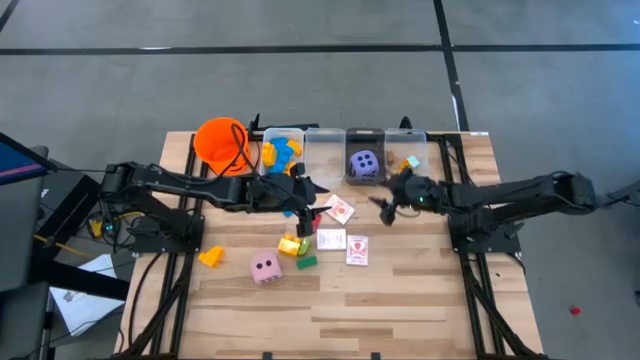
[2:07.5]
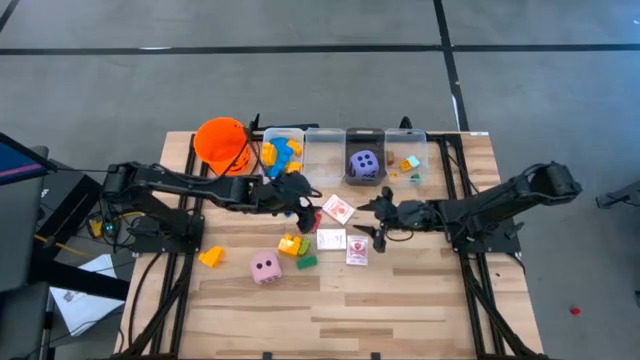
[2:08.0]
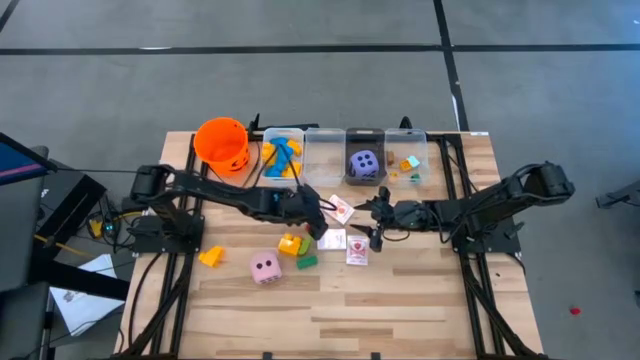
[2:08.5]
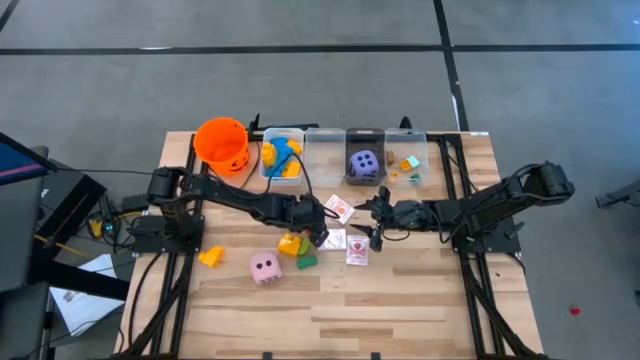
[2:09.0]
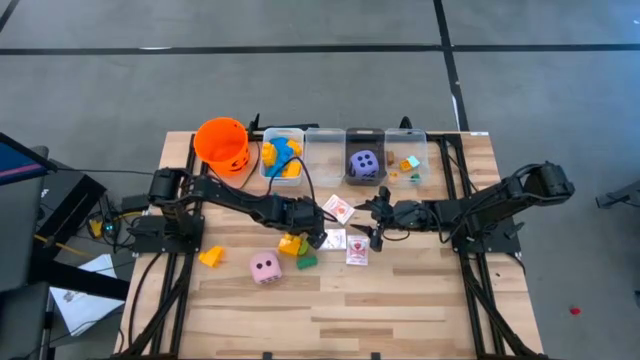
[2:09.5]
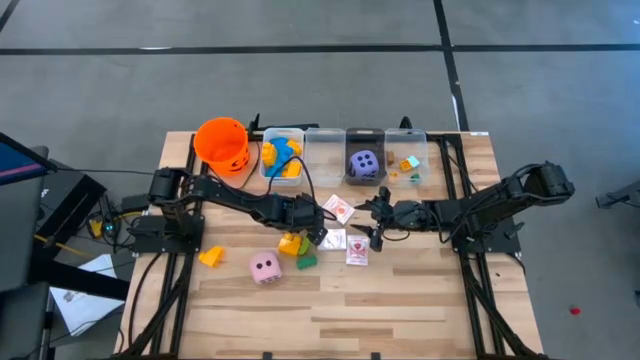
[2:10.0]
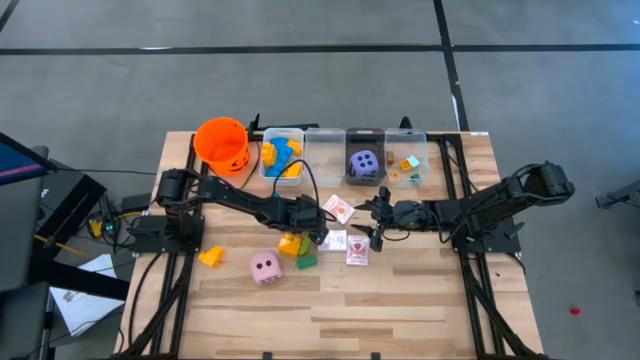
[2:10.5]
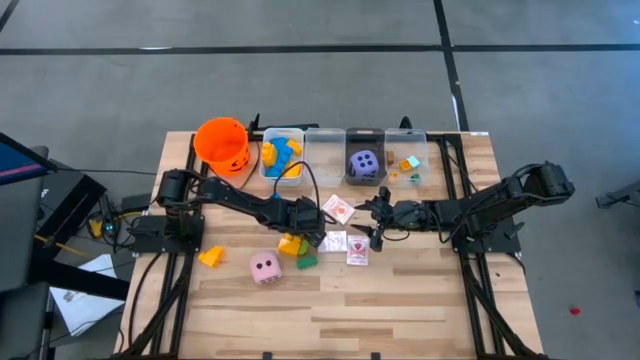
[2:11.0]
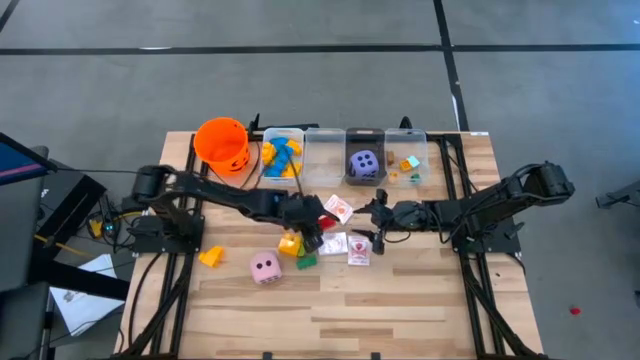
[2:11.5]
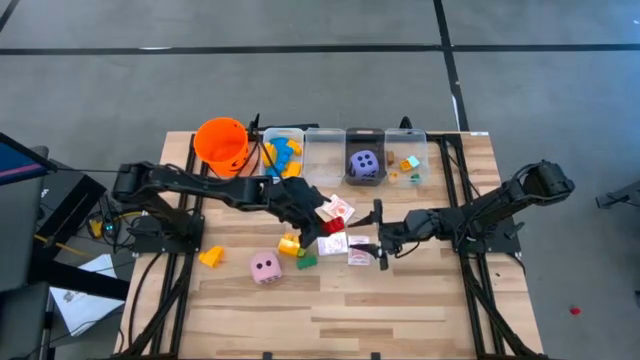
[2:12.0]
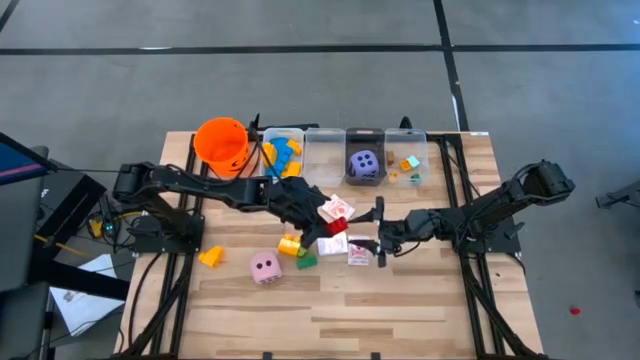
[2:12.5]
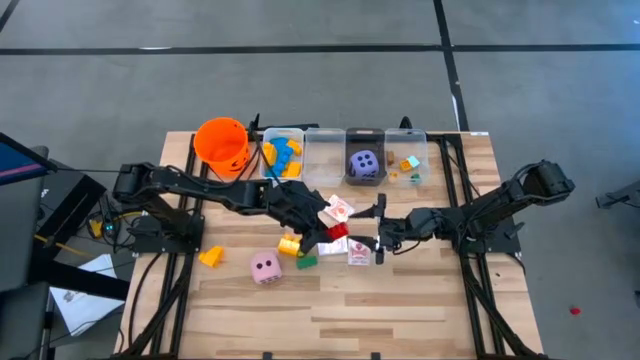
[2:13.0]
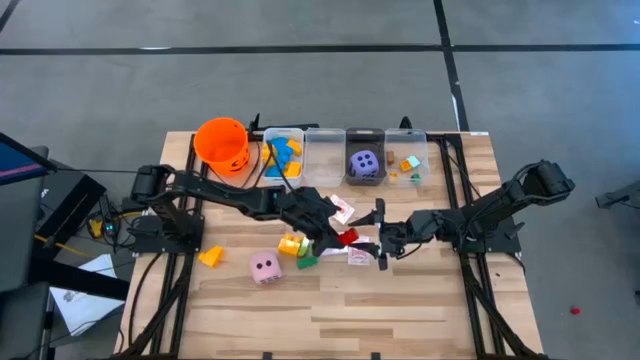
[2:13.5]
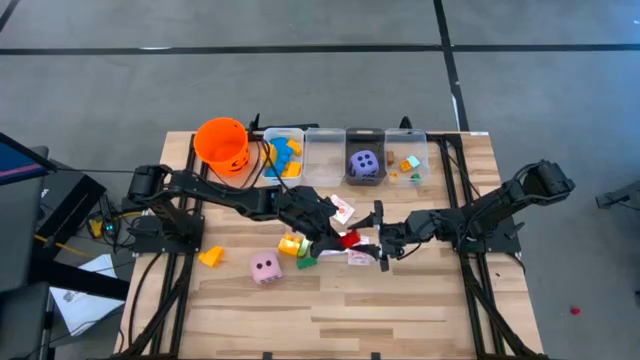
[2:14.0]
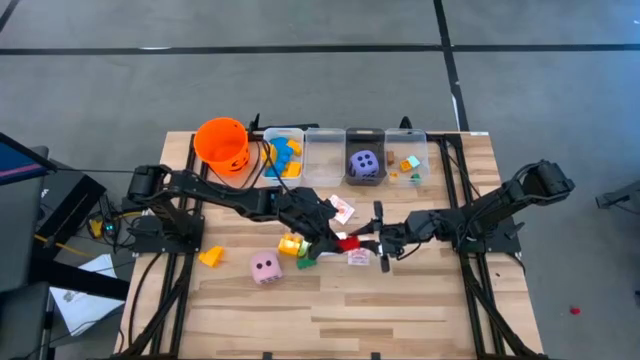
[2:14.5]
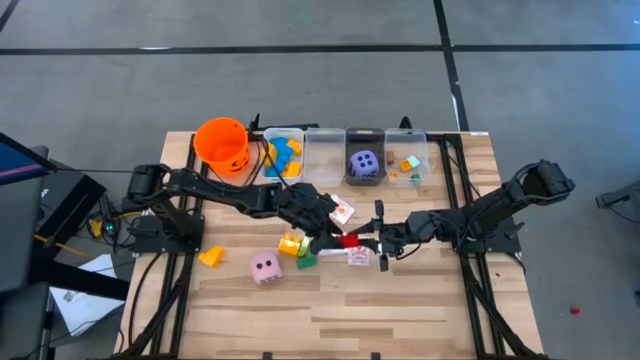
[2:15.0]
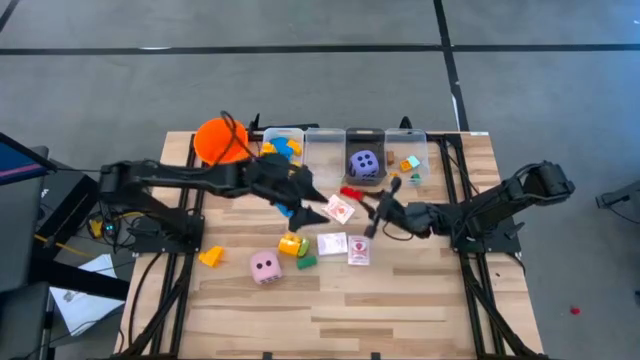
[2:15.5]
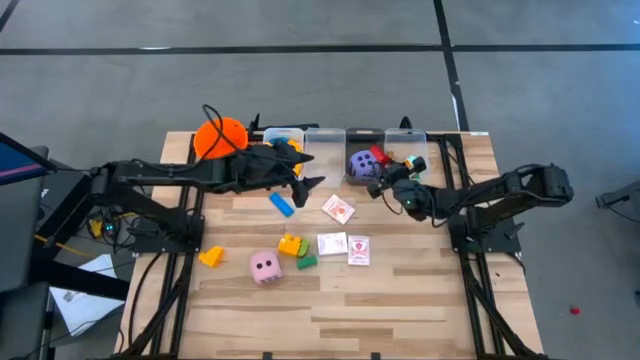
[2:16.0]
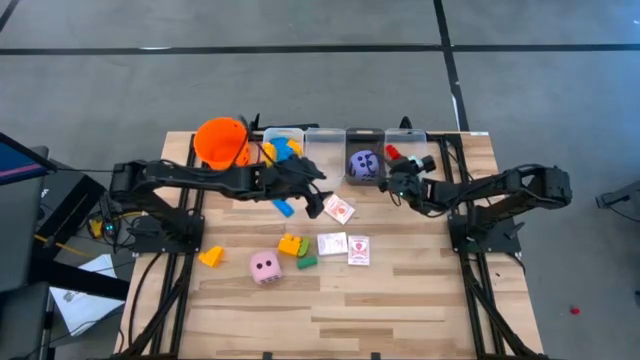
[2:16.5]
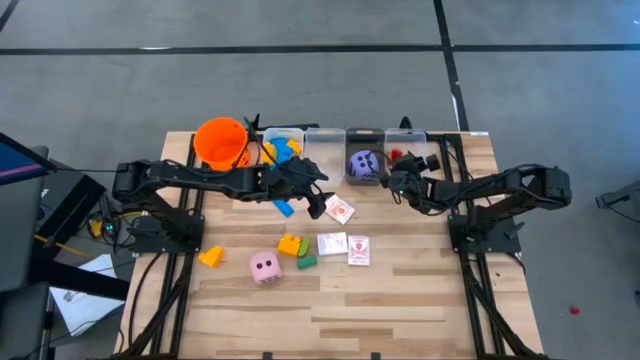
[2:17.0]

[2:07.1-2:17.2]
Task: Pick & Place Toys
Put the red game piece into the right transparent bin

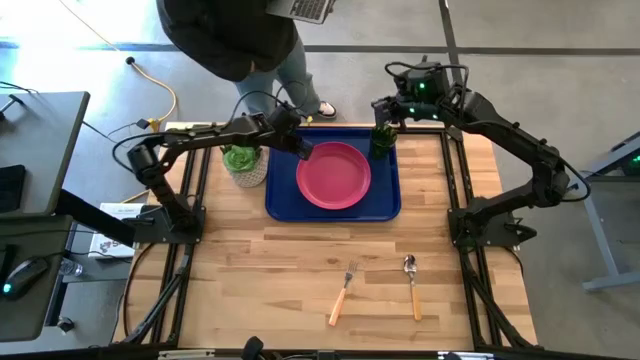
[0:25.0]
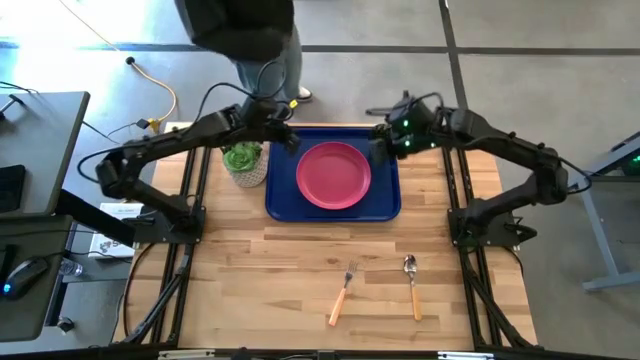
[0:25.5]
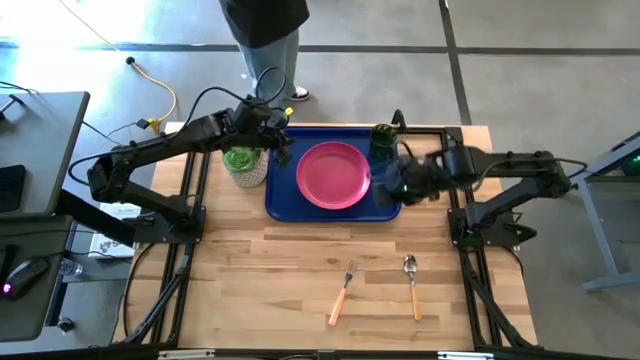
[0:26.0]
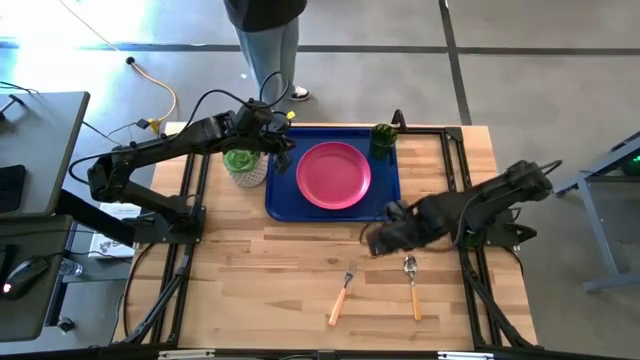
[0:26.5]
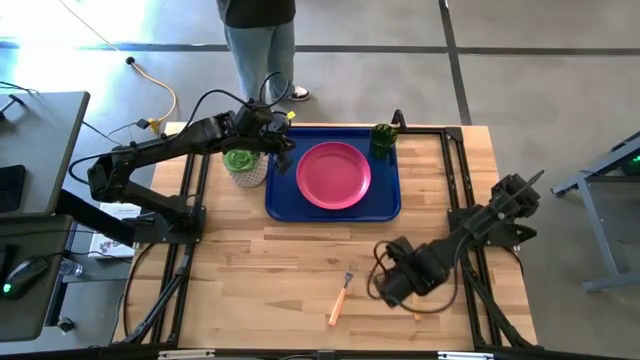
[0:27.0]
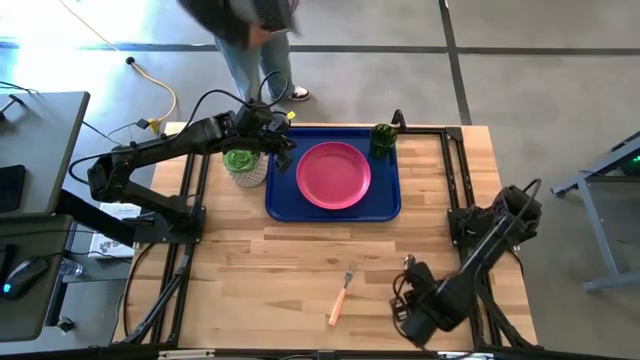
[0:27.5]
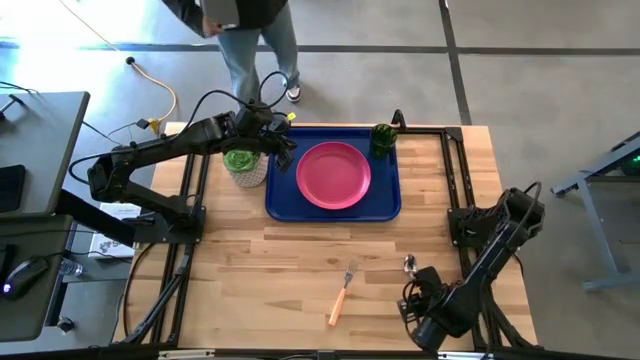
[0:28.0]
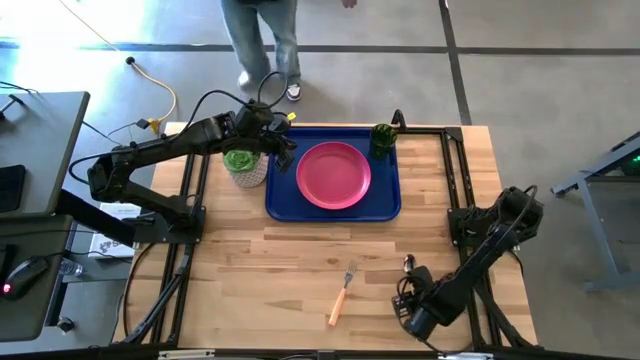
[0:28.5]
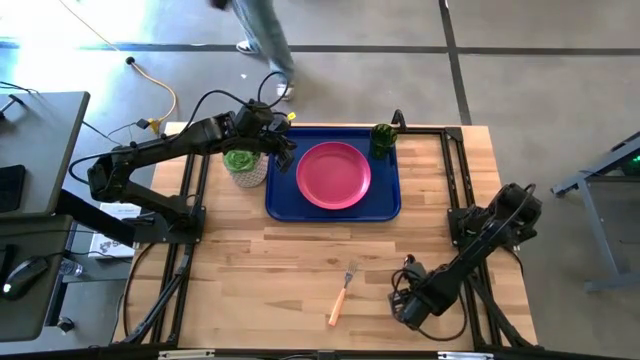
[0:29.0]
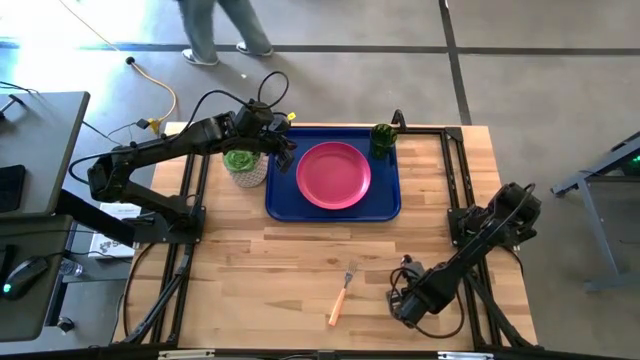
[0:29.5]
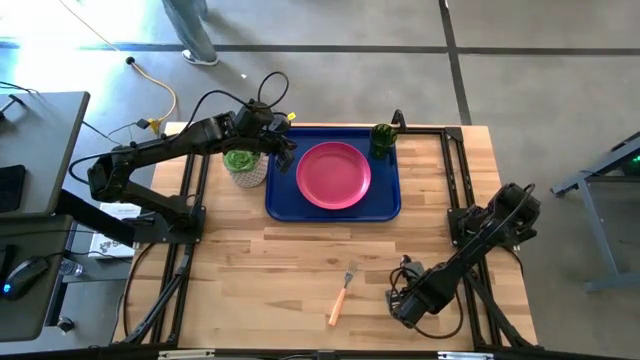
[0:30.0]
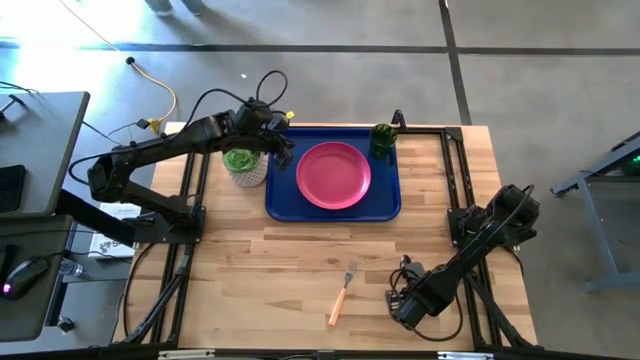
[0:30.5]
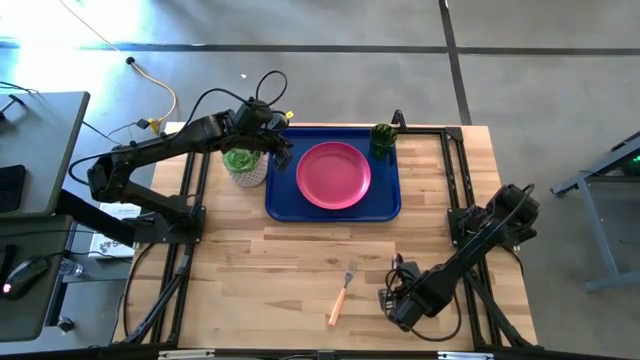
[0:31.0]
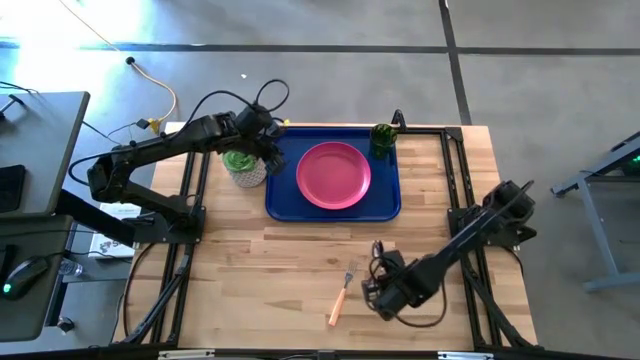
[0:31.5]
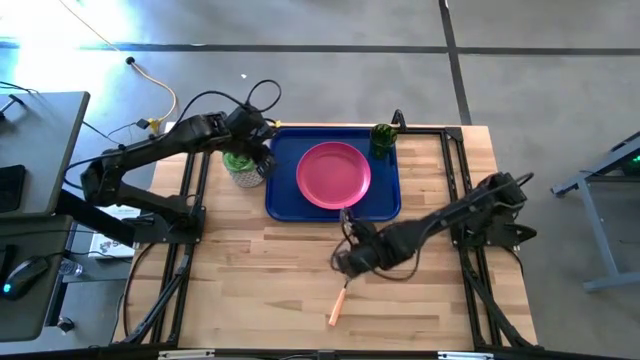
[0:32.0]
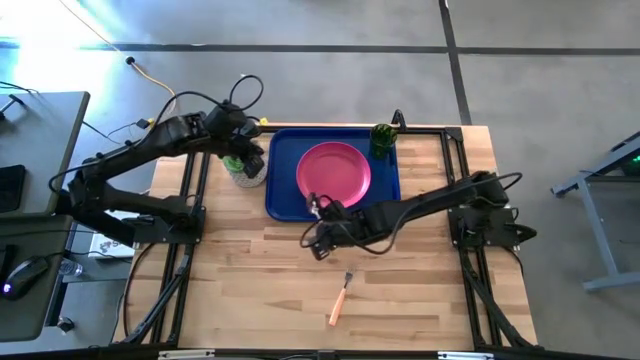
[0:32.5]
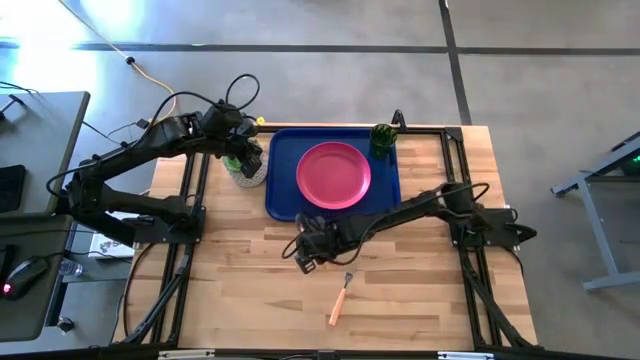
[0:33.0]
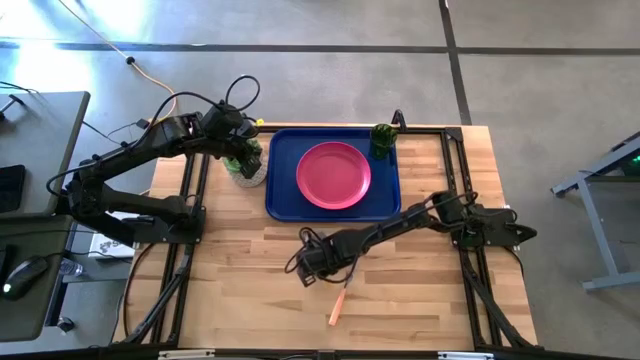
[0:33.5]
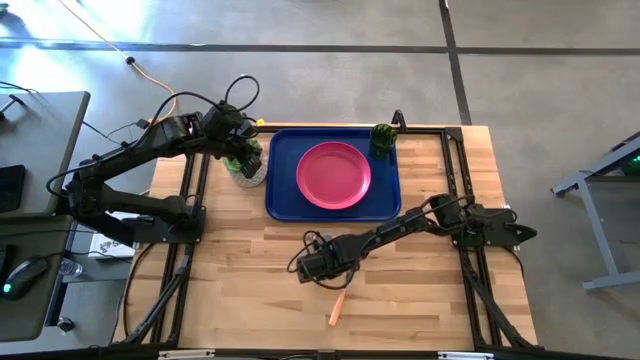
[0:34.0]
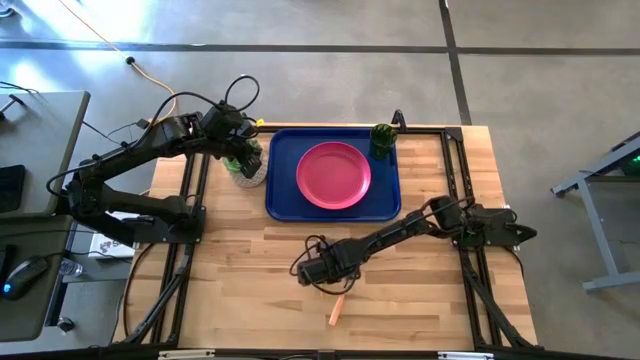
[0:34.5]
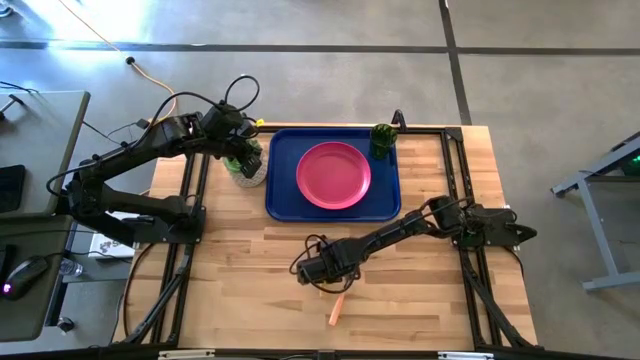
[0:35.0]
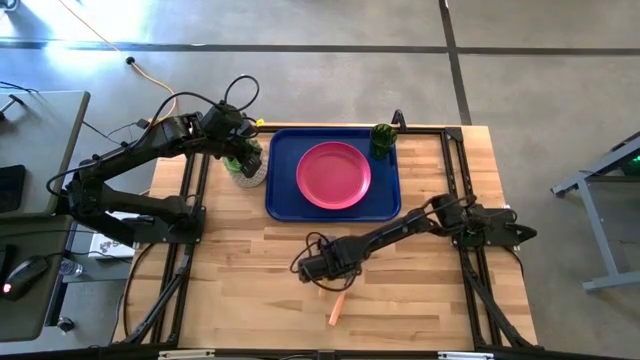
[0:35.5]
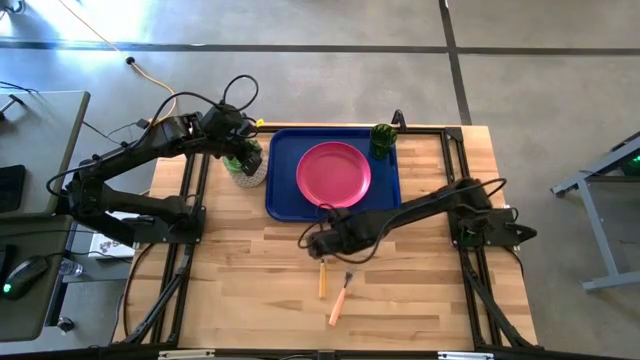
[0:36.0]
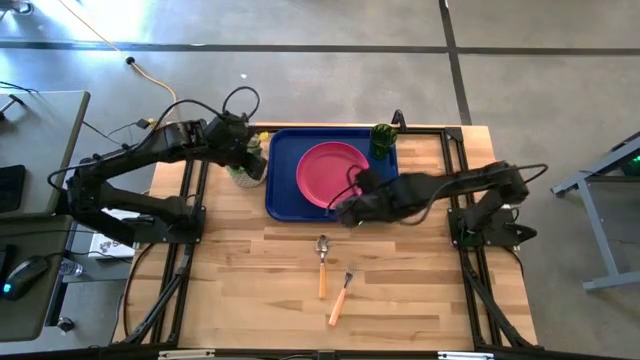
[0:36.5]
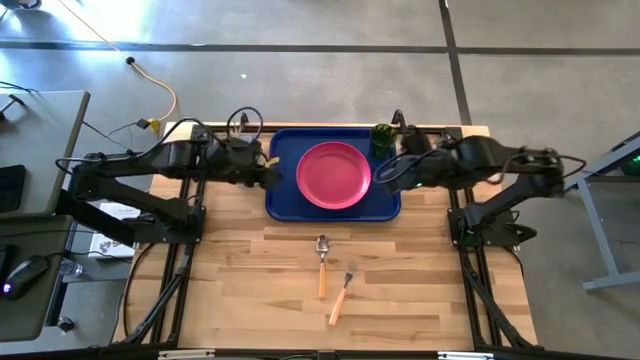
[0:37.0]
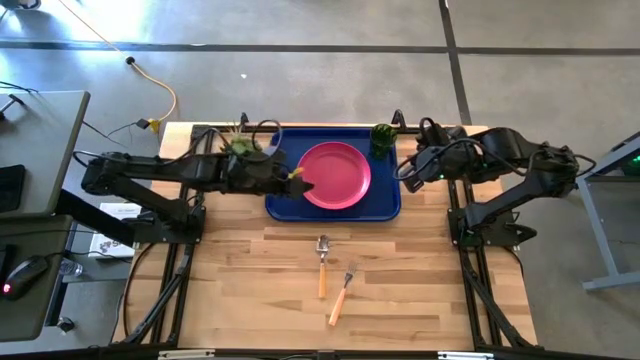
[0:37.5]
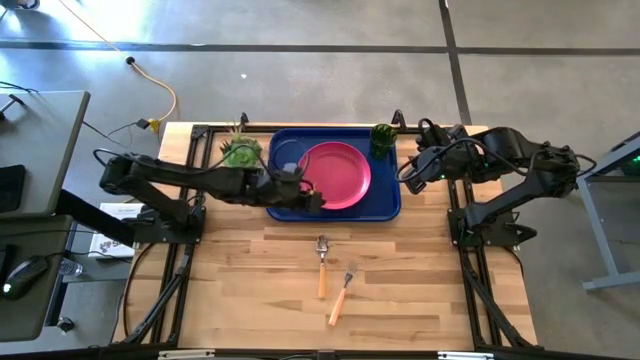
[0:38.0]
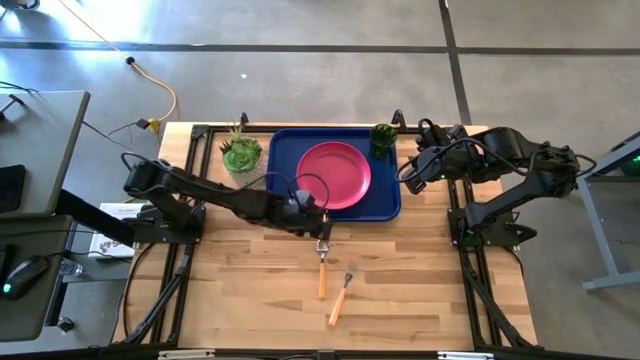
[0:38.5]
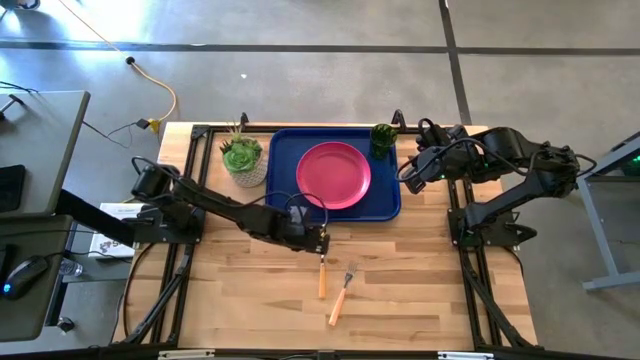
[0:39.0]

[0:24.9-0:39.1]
Task: Pick and place plate/cup/fork/spoon on tray
Put the orange spoon on the blue serving tray to the left side of the pink plate
